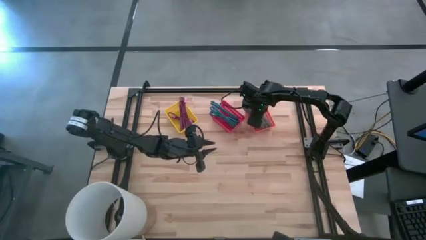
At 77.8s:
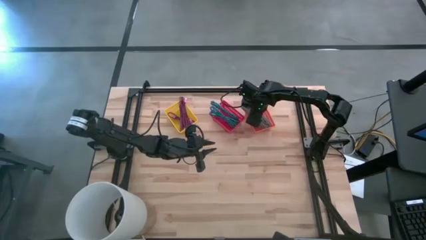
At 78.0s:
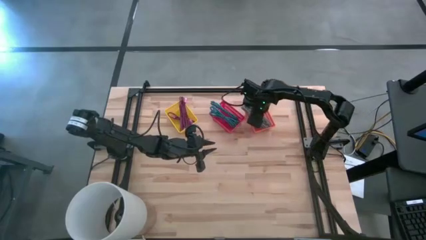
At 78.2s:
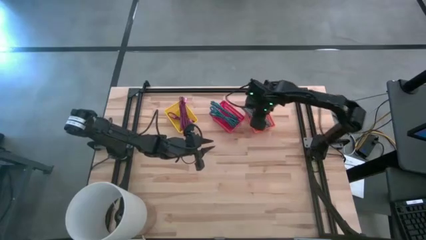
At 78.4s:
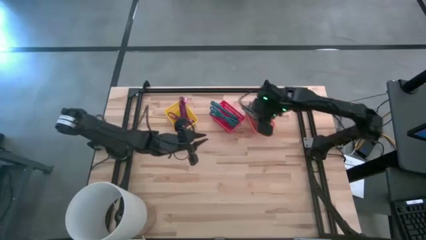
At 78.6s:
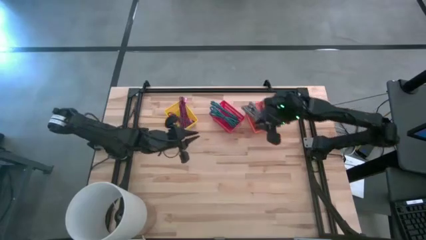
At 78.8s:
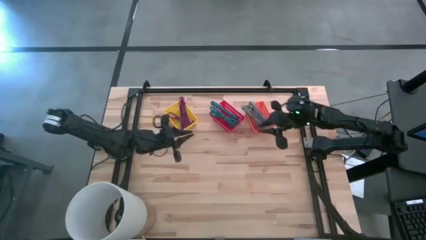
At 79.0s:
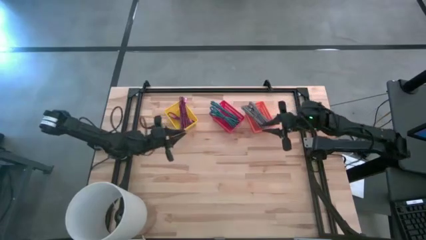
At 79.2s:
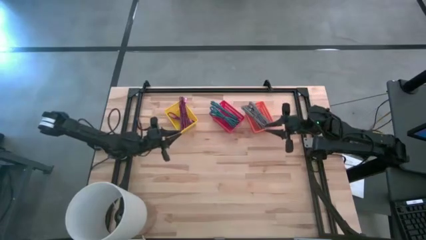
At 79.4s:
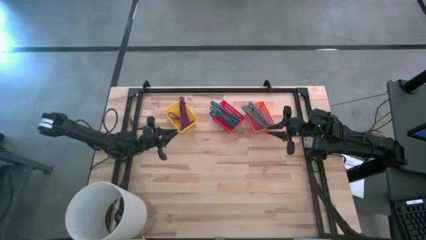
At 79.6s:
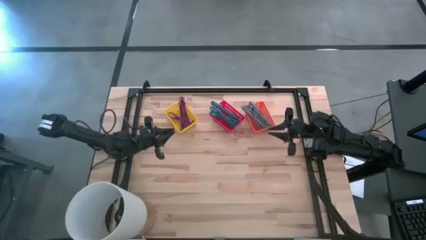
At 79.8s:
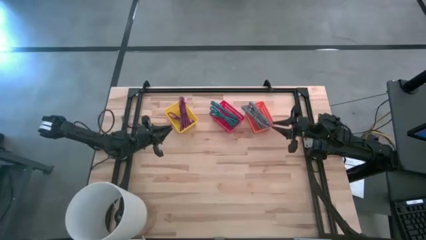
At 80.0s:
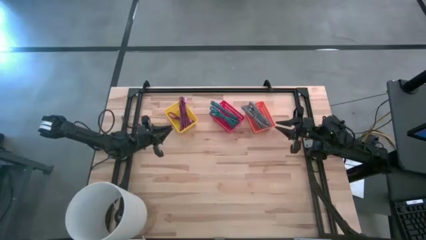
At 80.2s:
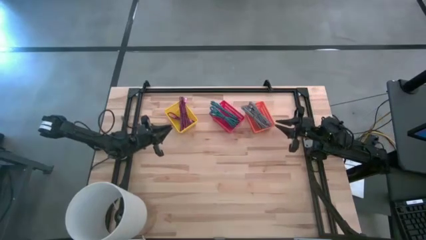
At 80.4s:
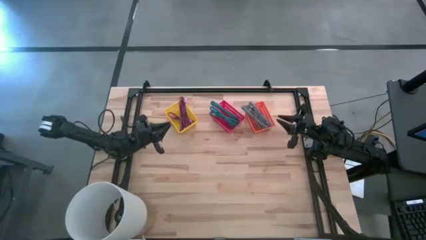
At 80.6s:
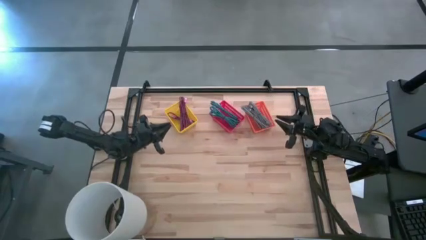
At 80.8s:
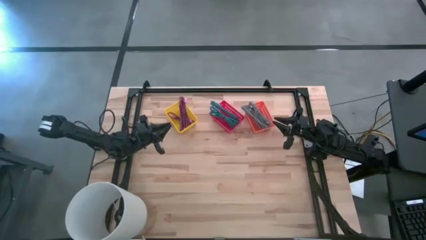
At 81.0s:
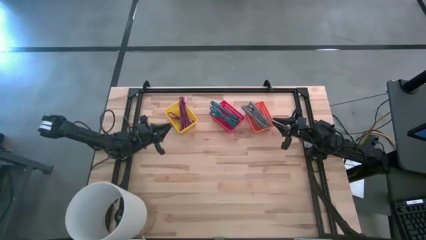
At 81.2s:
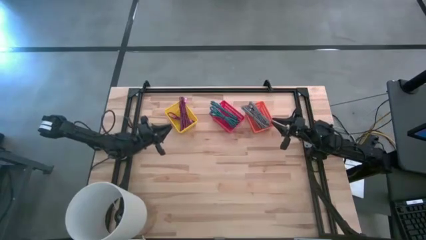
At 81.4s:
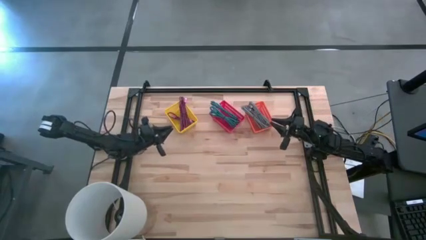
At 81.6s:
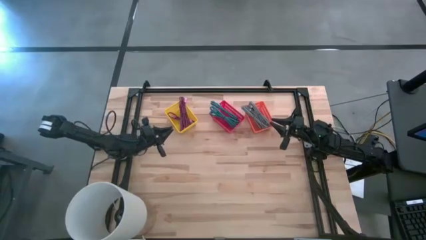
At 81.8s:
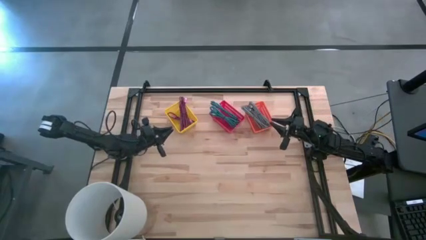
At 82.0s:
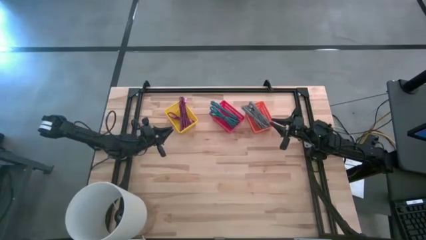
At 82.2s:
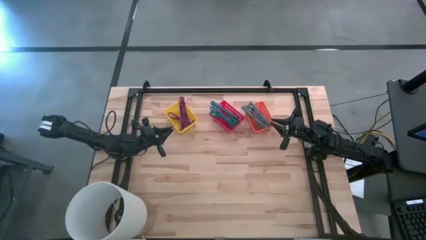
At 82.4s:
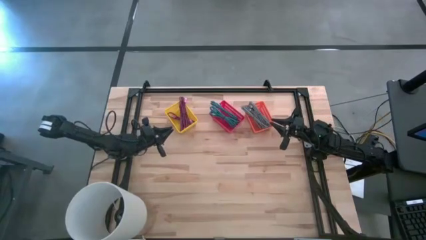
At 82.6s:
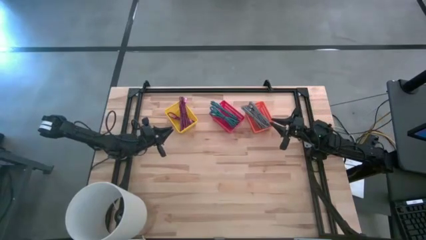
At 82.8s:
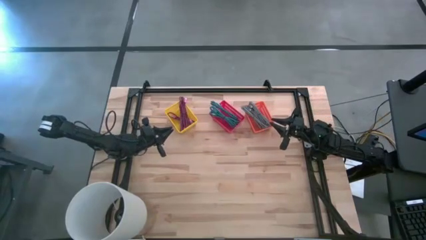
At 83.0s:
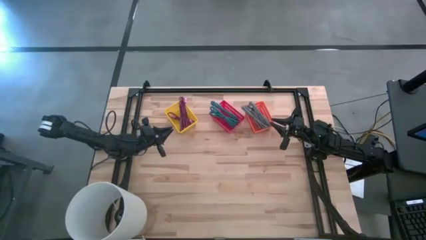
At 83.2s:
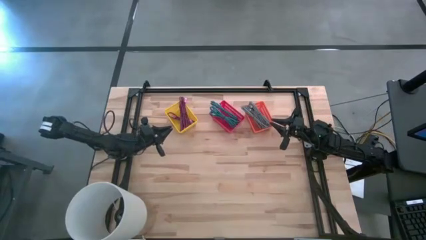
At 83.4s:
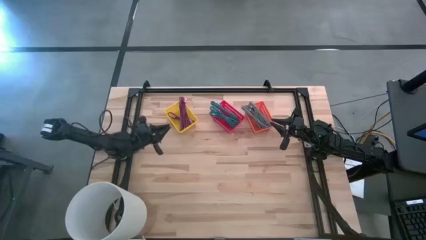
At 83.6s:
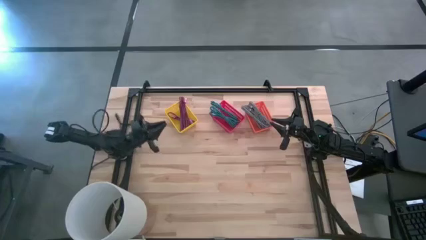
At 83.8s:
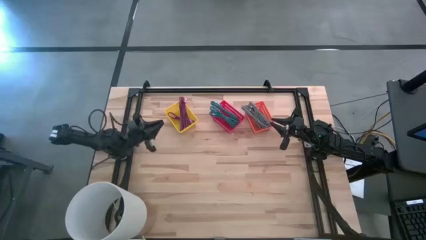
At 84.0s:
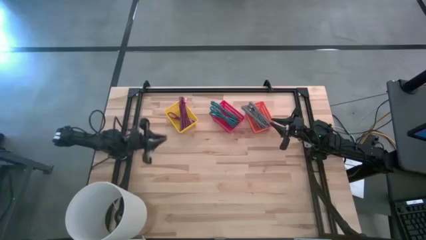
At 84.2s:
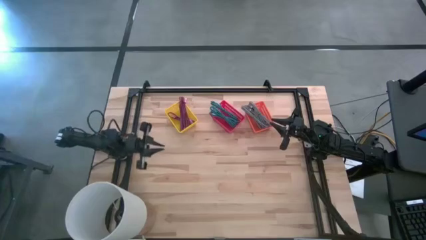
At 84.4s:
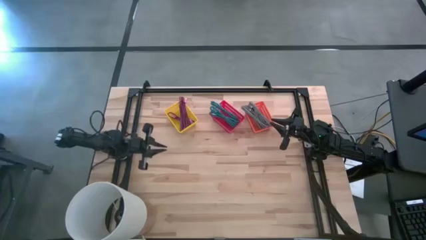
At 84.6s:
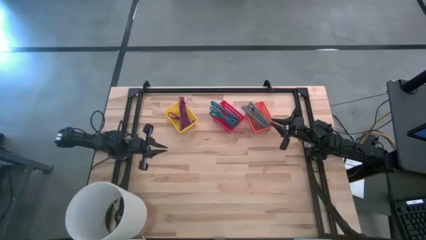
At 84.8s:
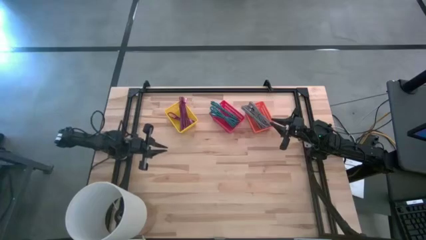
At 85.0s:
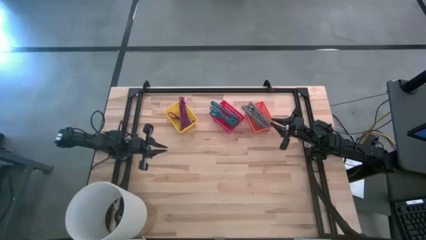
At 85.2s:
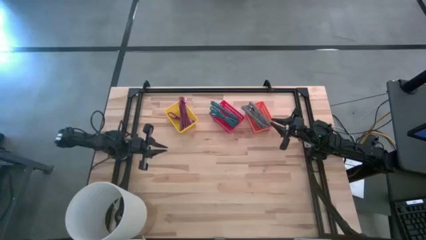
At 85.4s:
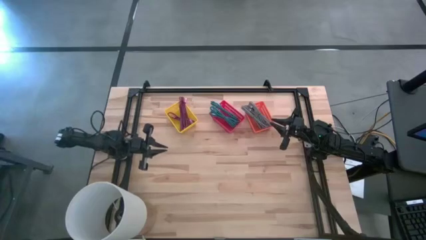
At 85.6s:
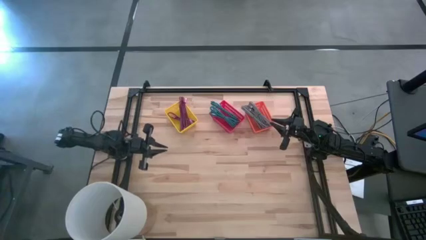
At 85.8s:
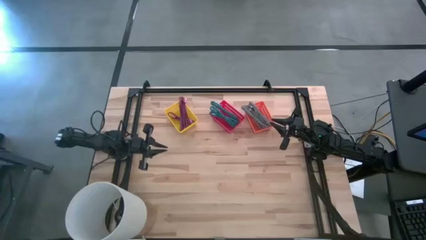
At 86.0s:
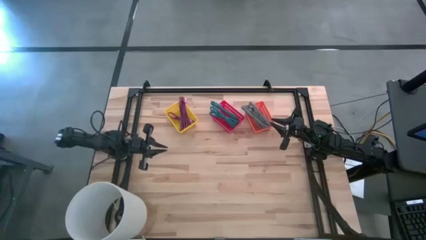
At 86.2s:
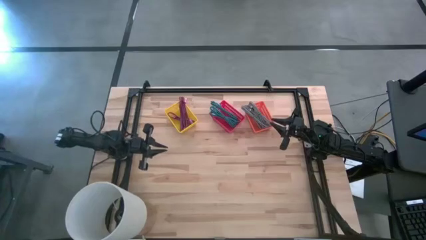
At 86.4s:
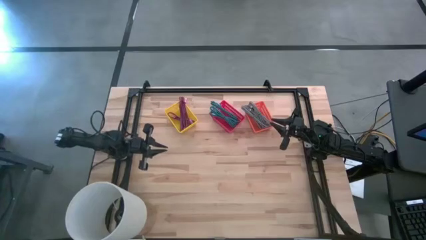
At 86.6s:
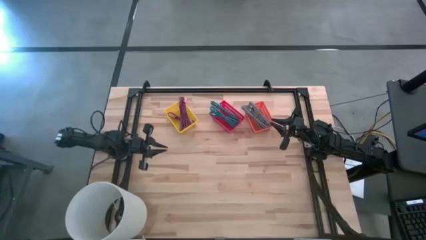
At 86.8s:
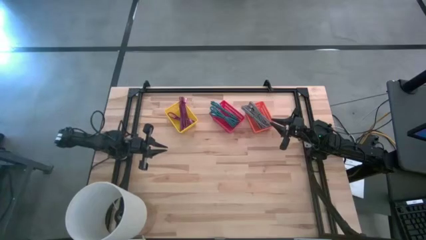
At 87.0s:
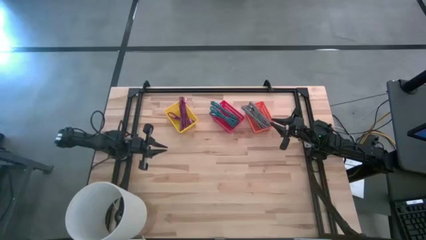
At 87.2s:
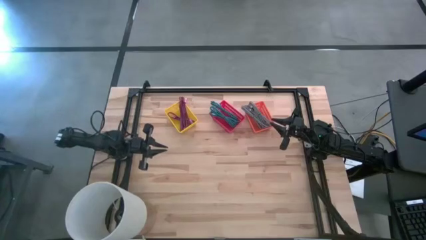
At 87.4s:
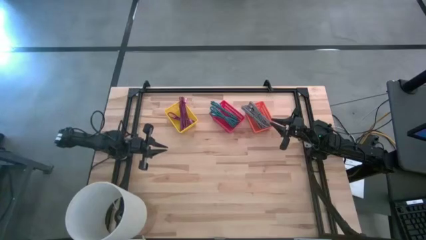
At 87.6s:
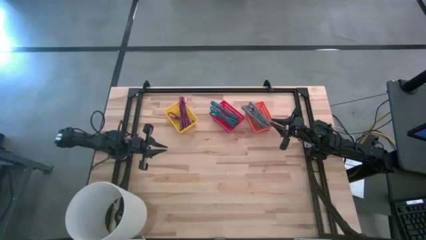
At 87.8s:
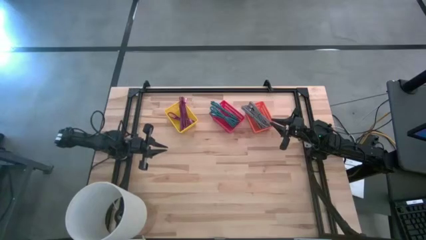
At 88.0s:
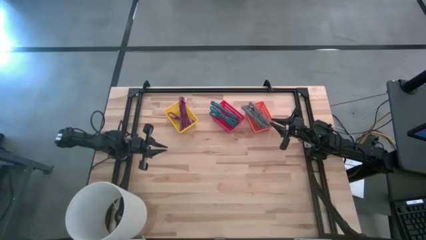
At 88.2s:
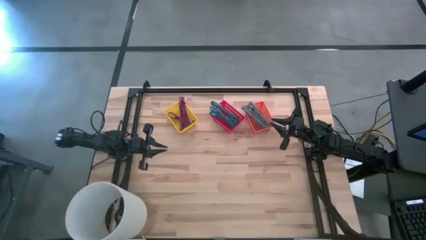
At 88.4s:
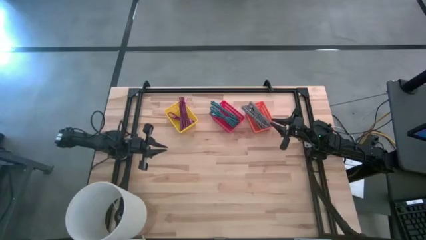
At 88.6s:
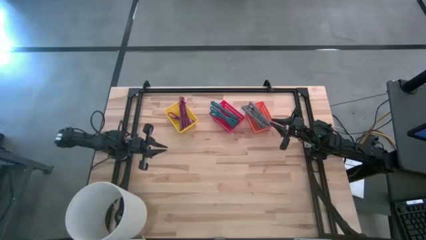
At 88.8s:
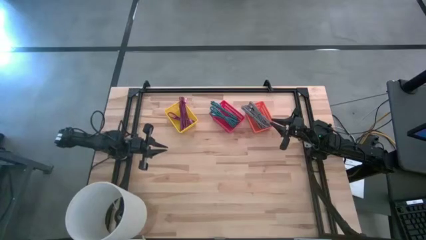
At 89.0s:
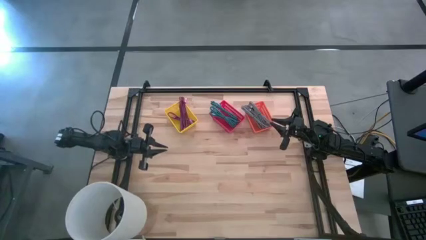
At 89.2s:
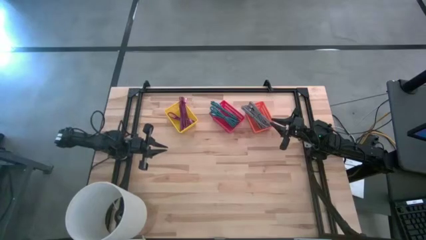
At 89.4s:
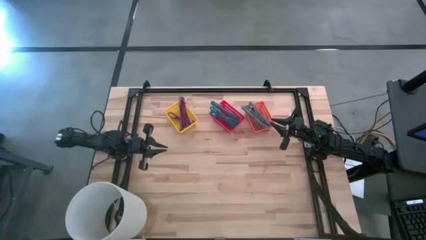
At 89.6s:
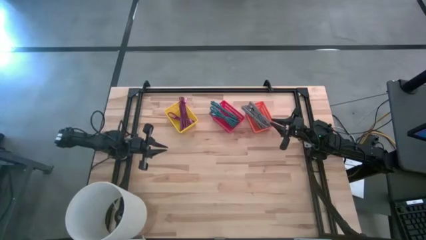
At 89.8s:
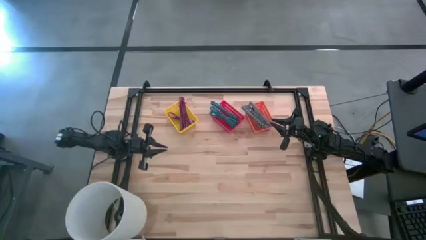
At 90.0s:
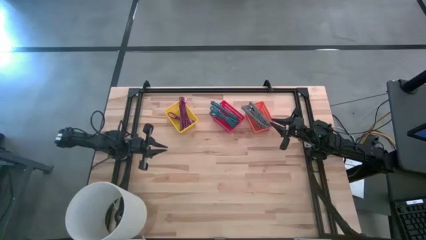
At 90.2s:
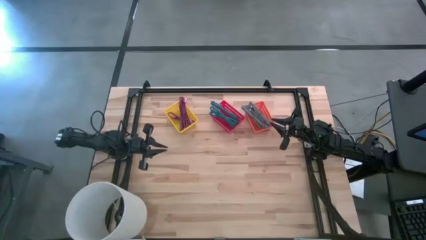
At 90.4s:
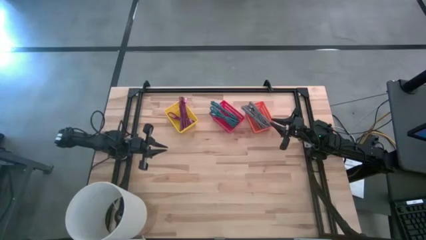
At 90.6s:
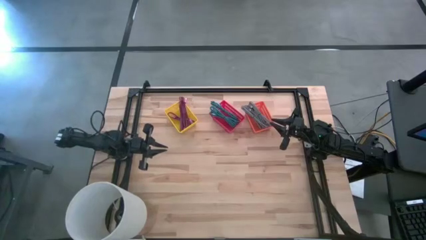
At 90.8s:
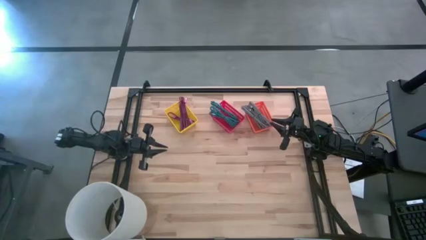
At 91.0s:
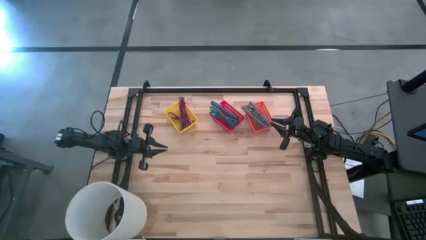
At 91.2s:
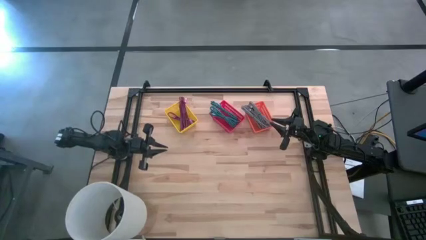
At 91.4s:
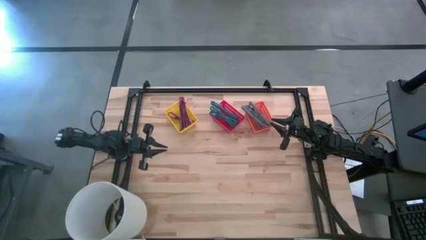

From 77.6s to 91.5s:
Task: Pick & Place USB Port
Return to Home Position
